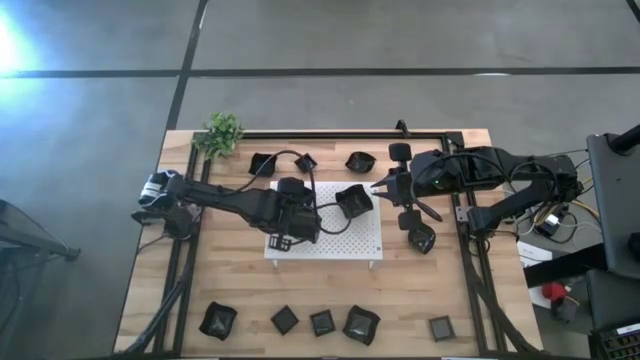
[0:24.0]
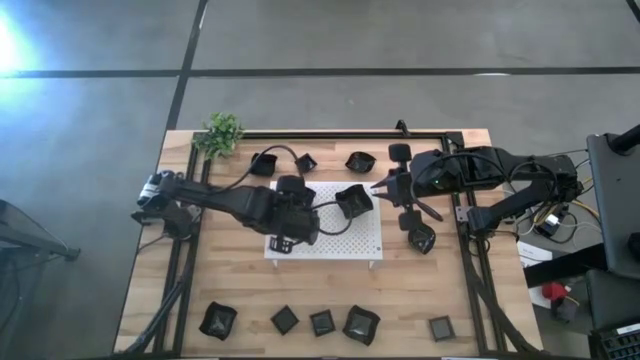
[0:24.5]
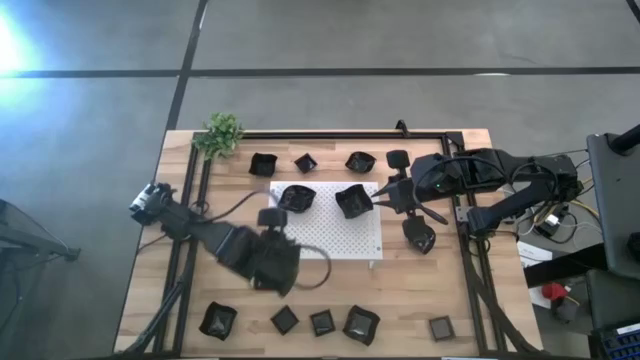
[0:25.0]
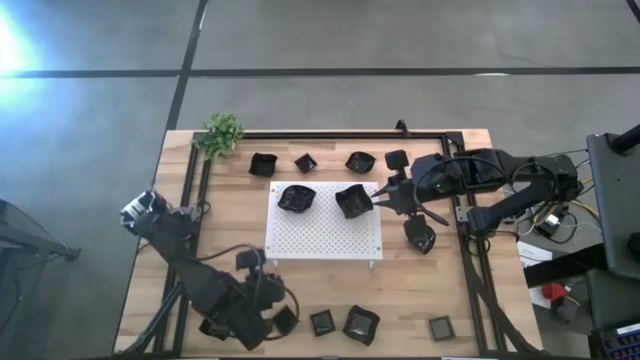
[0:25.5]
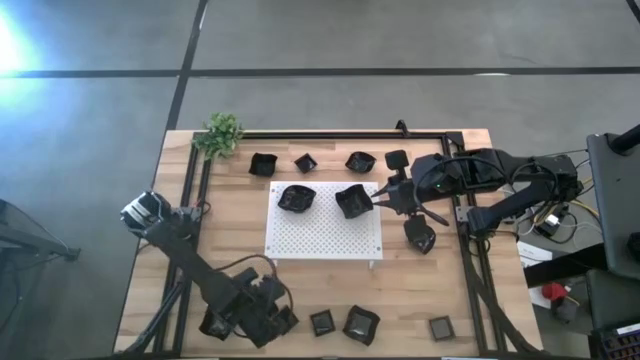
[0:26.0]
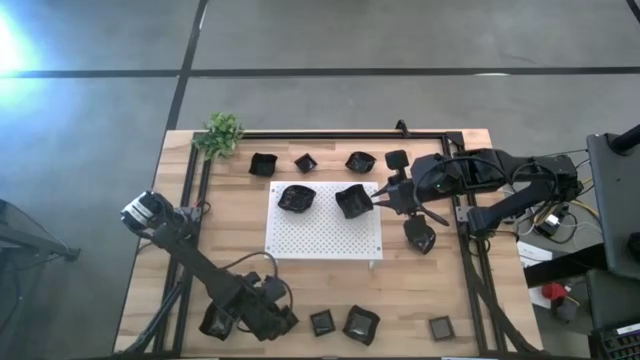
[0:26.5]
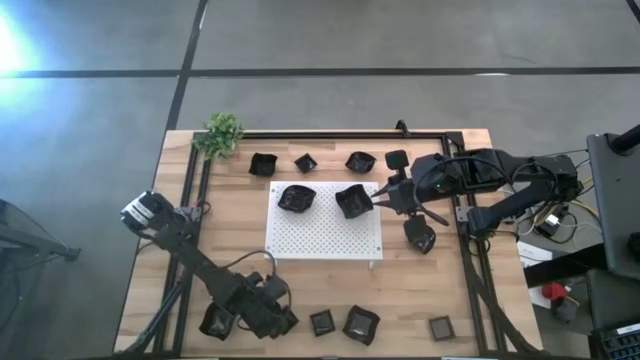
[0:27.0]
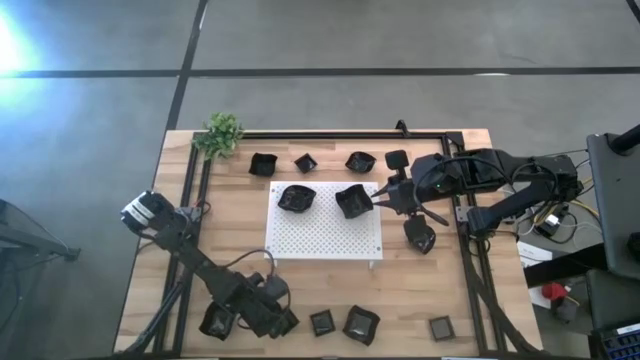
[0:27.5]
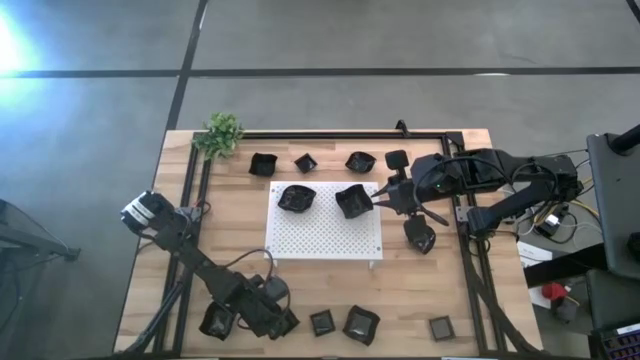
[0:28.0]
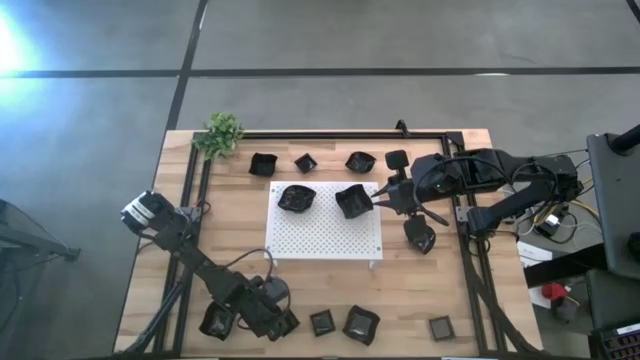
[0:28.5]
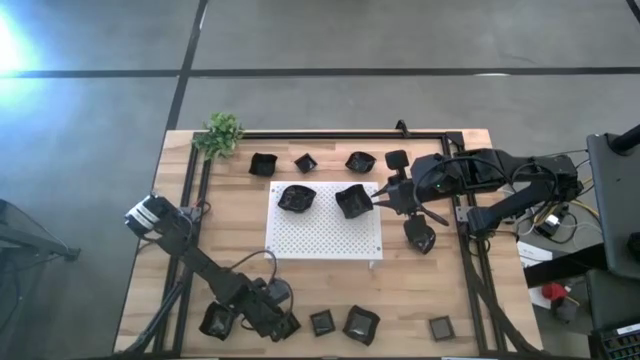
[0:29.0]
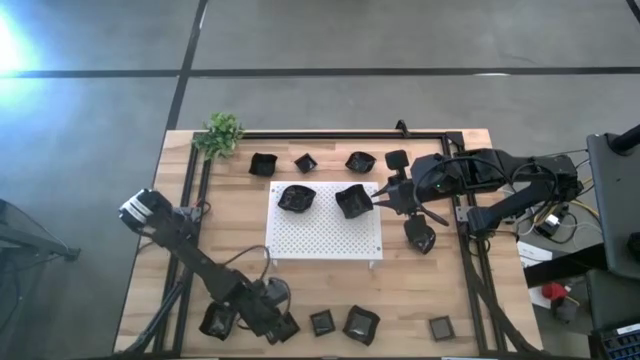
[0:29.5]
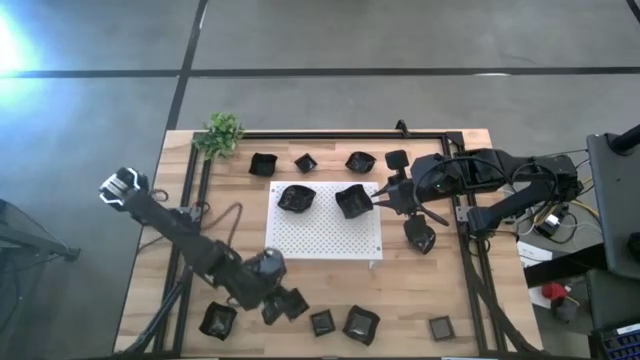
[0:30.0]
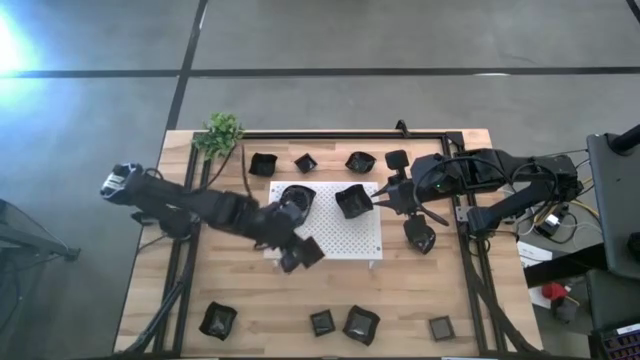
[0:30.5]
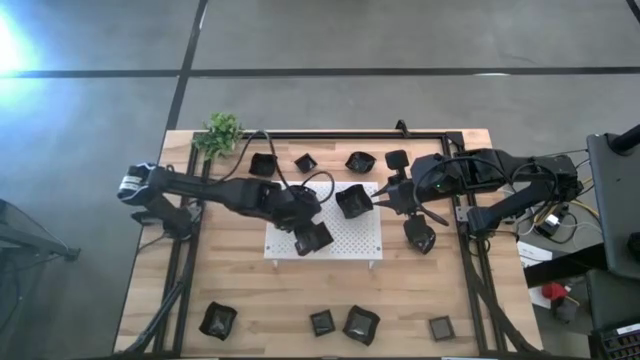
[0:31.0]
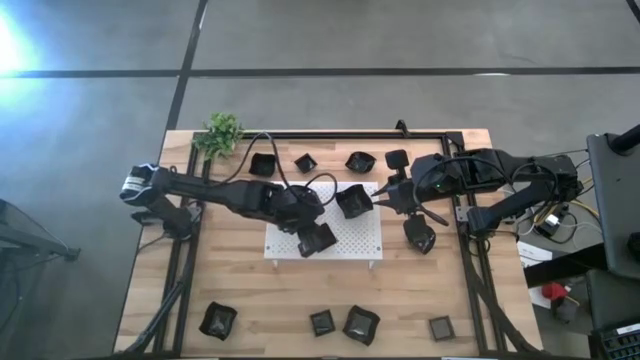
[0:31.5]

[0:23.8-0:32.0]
Task: Pick & Place Mini shaped plates
Put the black square plate on the shelf

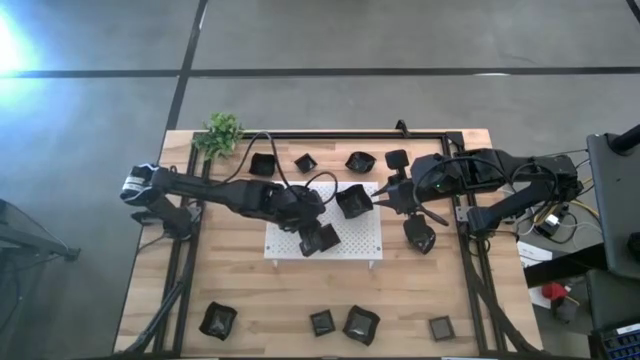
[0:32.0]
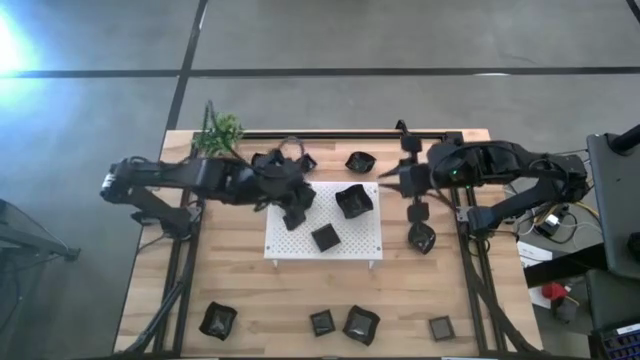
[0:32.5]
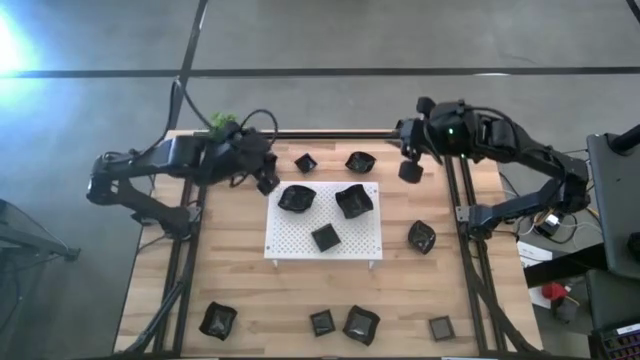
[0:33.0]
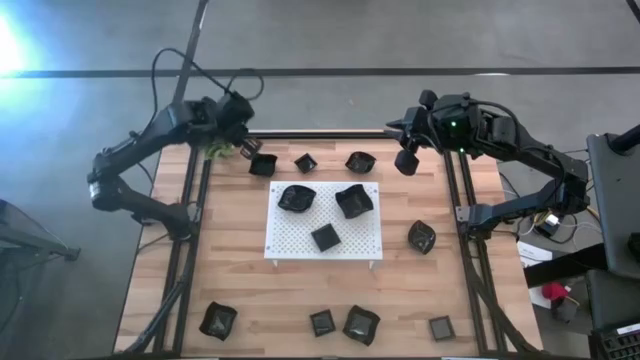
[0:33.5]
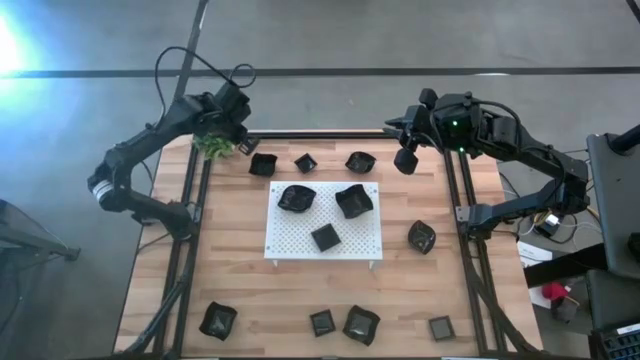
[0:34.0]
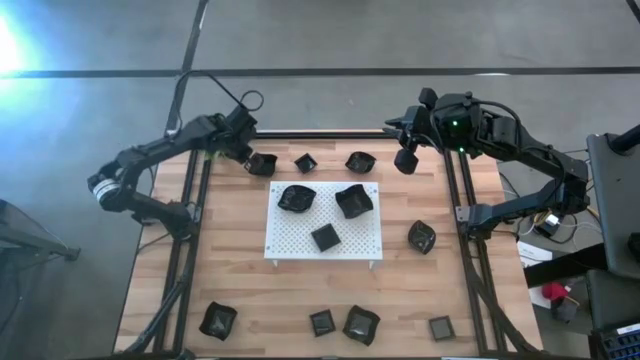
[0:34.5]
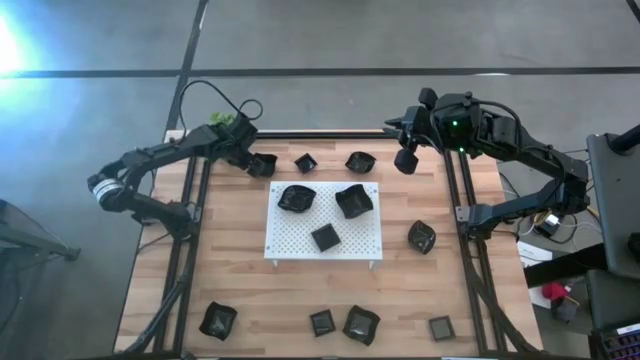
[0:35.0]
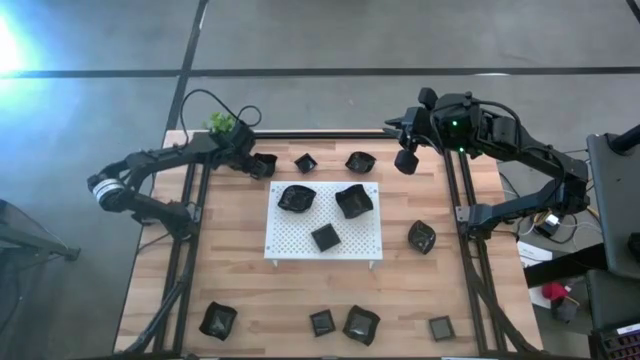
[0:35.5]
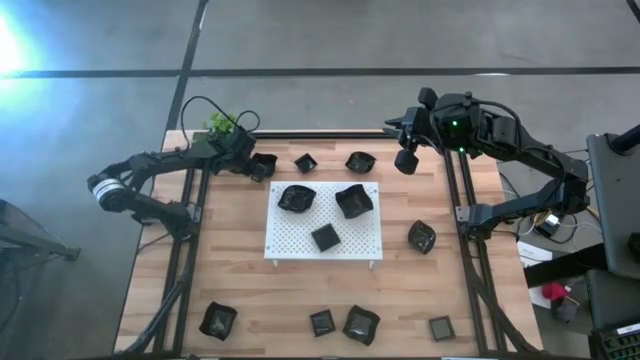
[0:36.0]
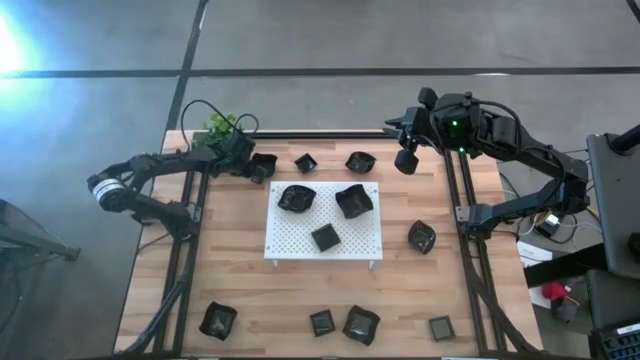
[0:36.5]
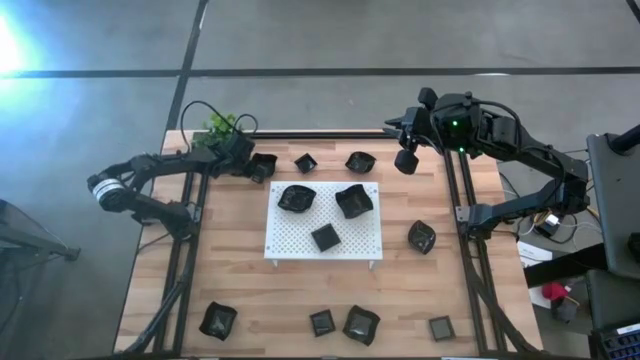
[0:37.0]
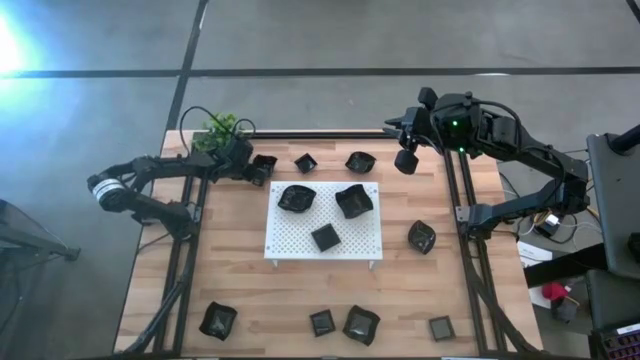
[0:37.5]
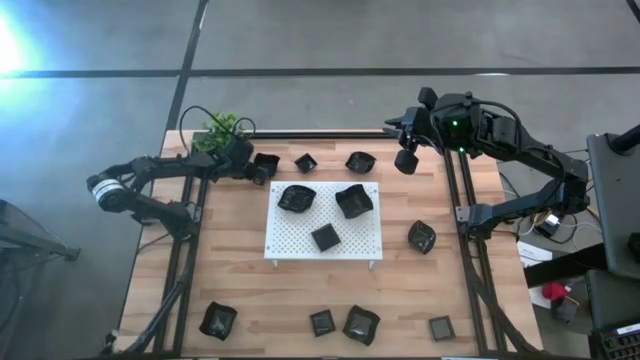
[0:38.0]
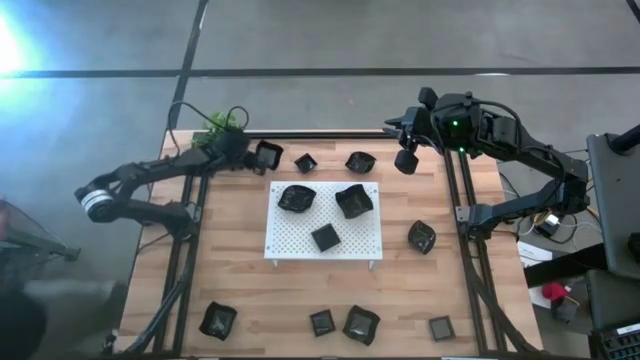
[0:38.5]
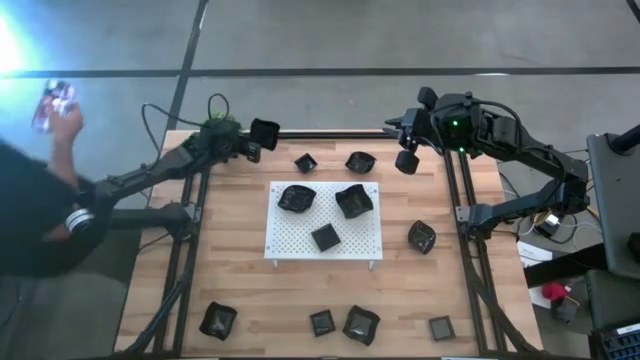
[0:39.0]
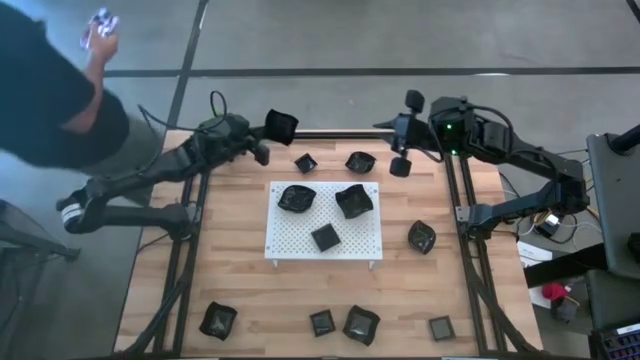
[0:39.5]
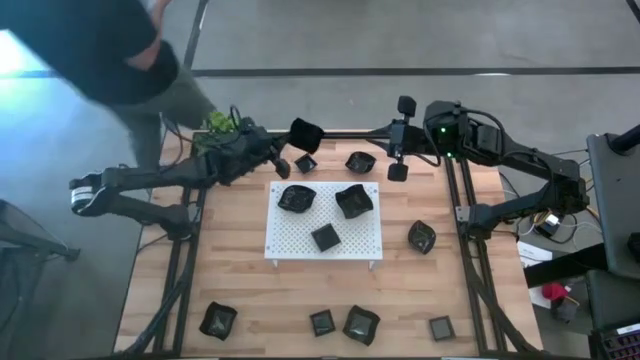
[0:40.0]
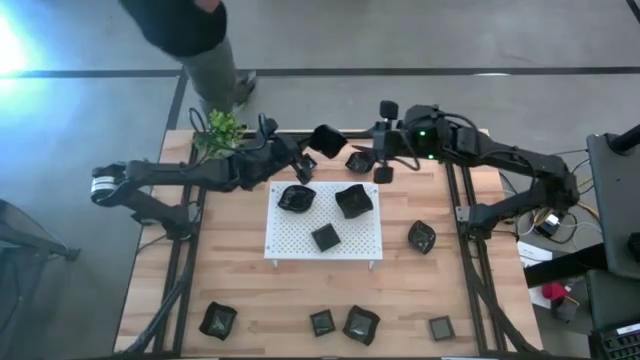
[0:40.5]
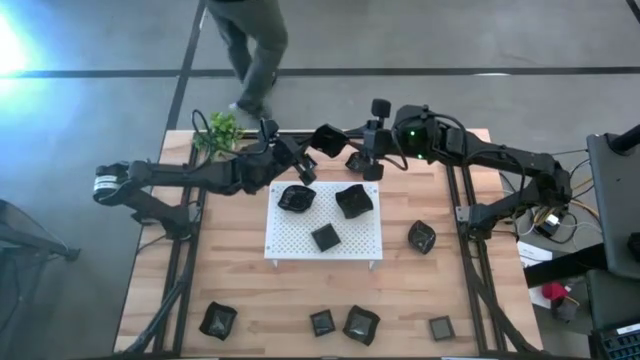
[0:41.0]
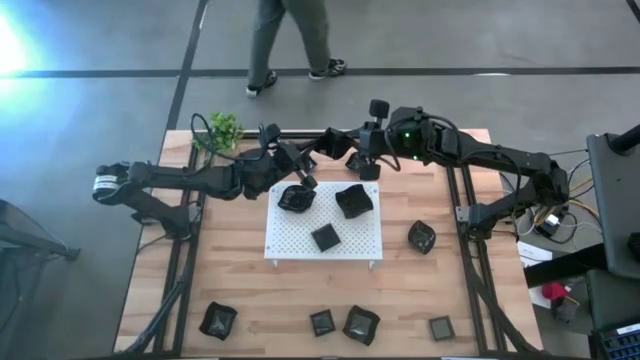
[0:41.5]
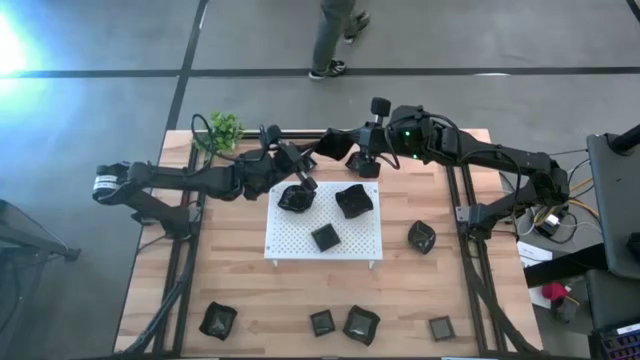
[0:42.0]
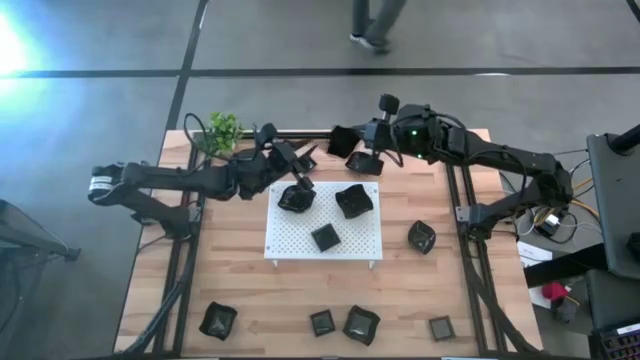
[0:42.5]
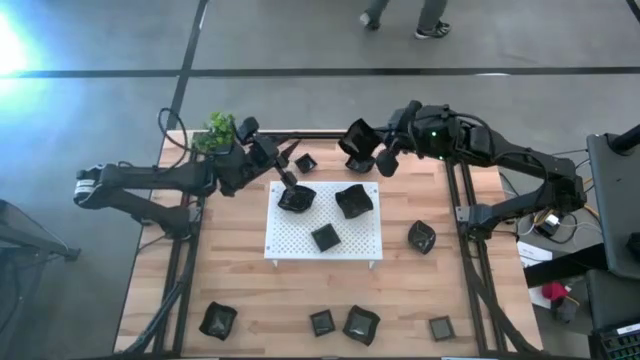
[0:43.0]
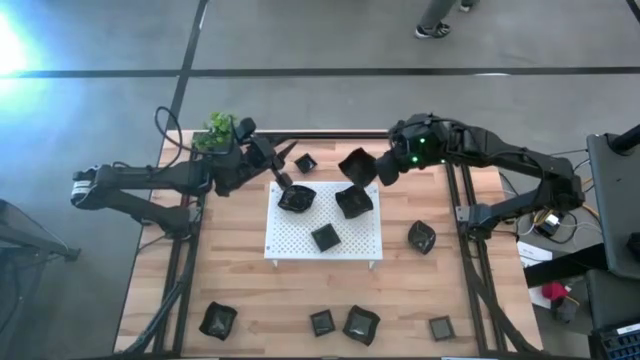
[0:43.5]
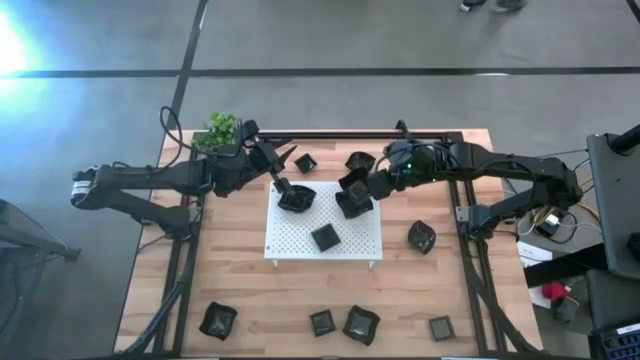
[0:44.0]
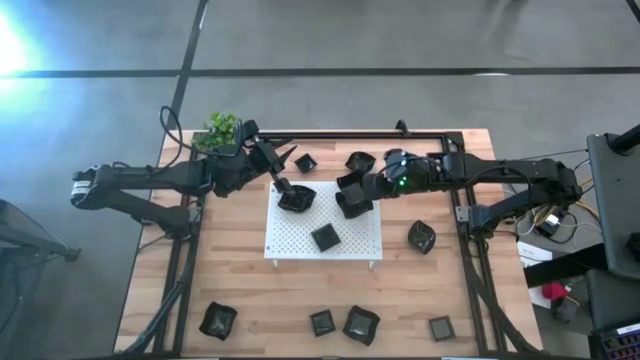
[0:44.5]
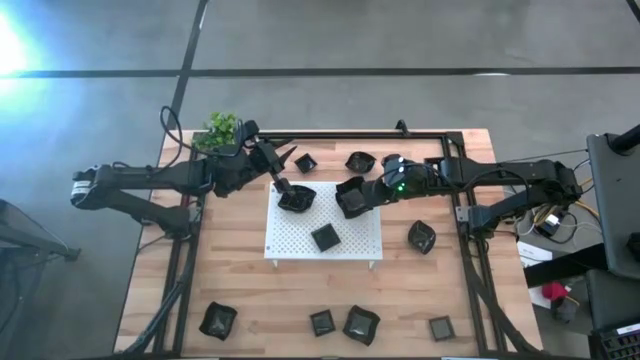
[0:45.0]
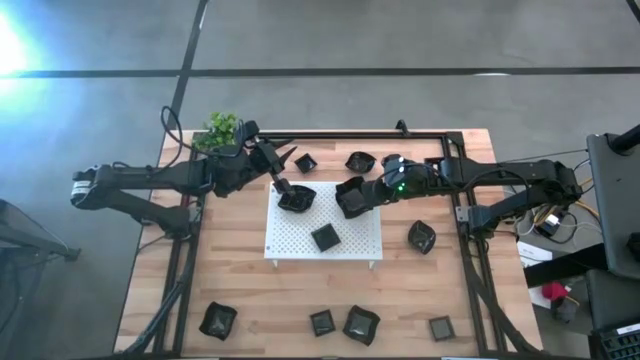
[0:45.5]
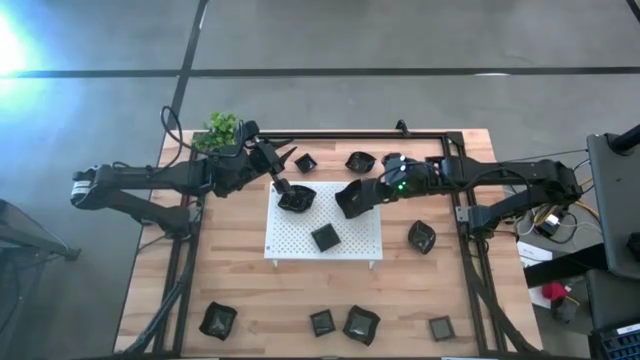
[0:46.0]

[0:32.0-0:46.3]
Stack the black distorted square plate on top of the black distorted square plate on the shelf
